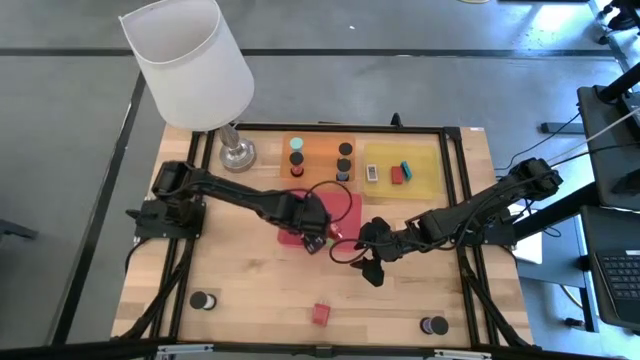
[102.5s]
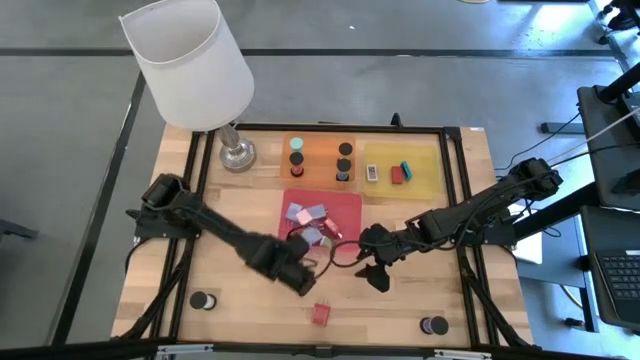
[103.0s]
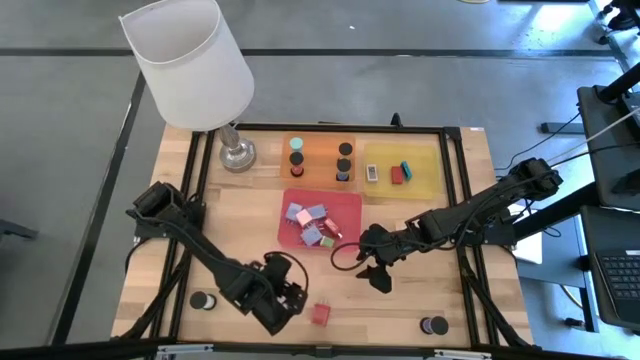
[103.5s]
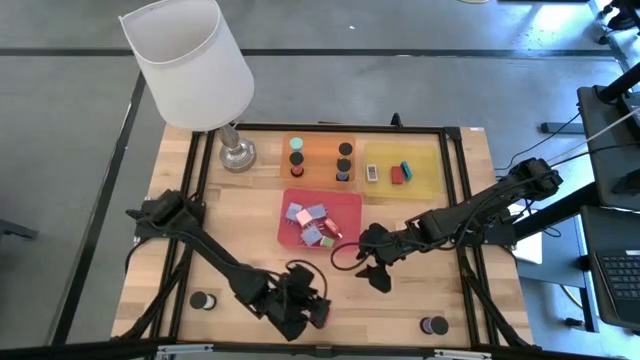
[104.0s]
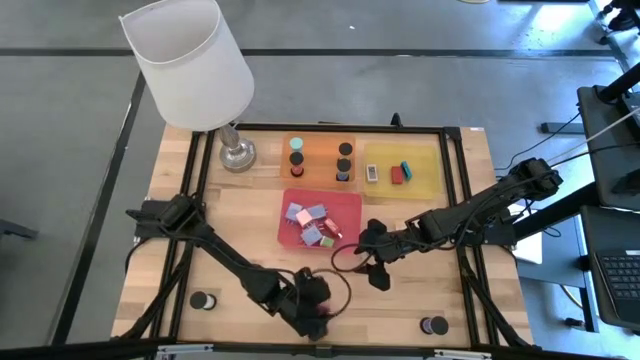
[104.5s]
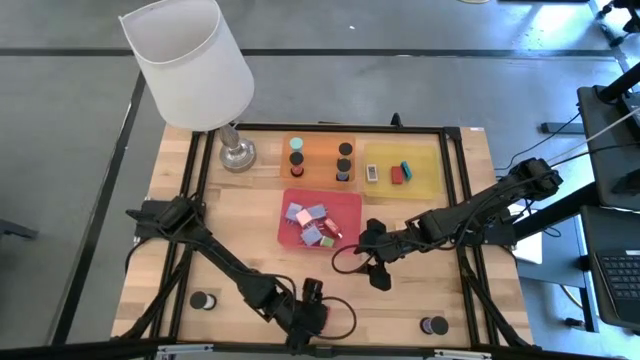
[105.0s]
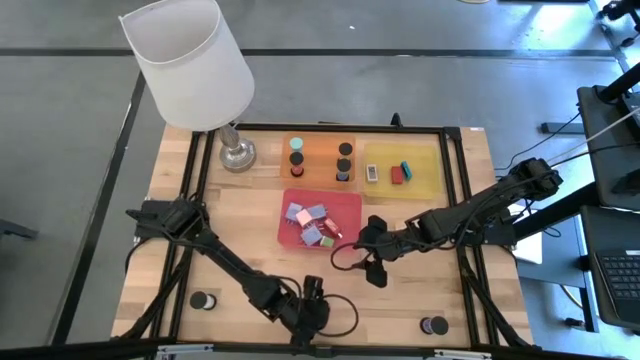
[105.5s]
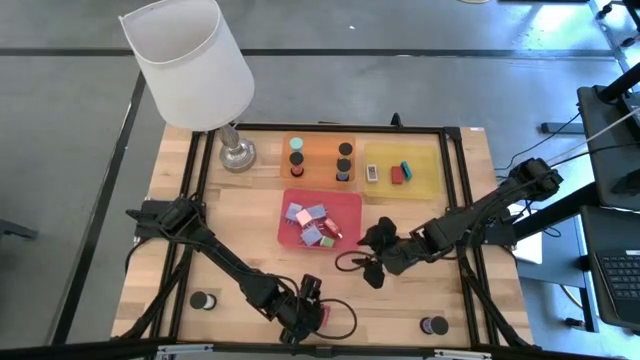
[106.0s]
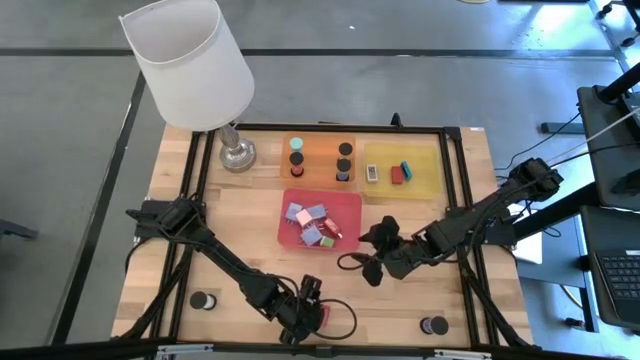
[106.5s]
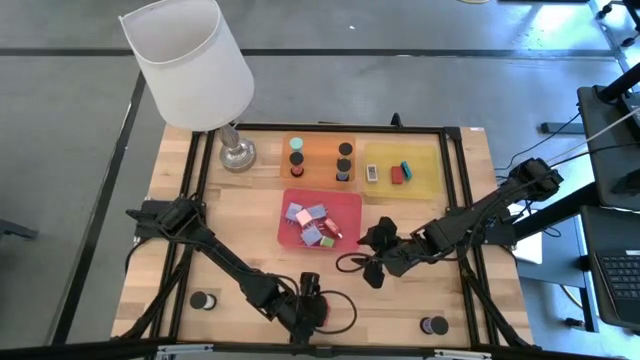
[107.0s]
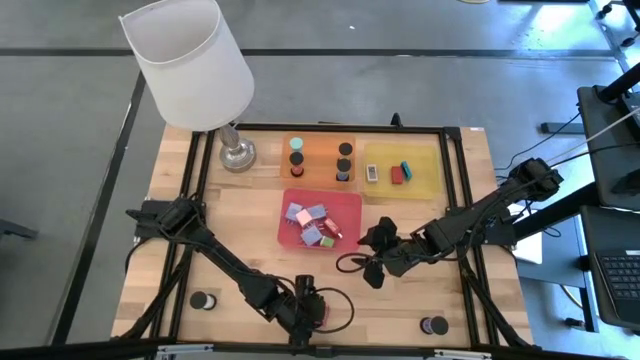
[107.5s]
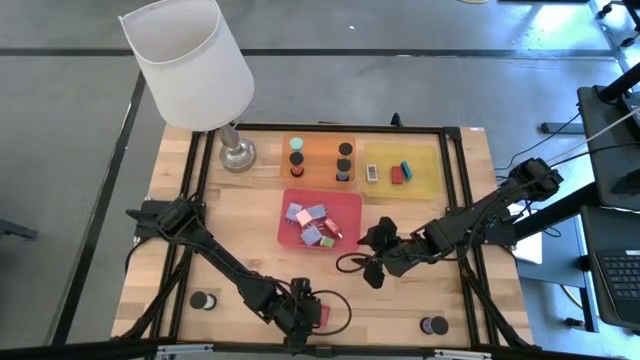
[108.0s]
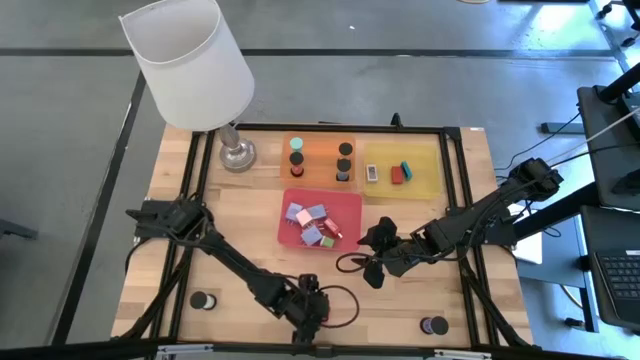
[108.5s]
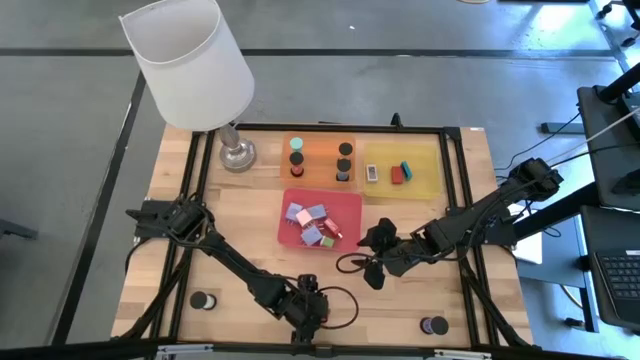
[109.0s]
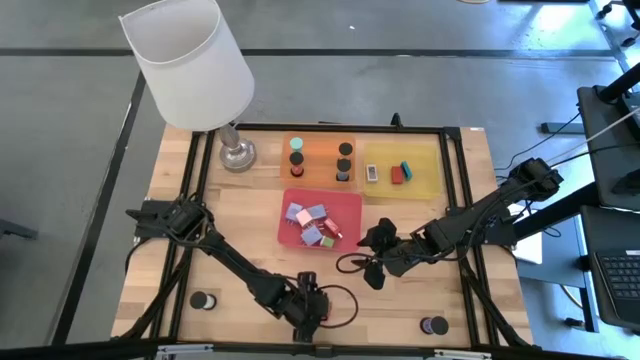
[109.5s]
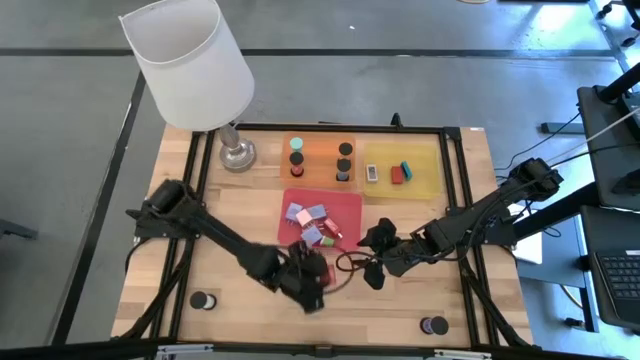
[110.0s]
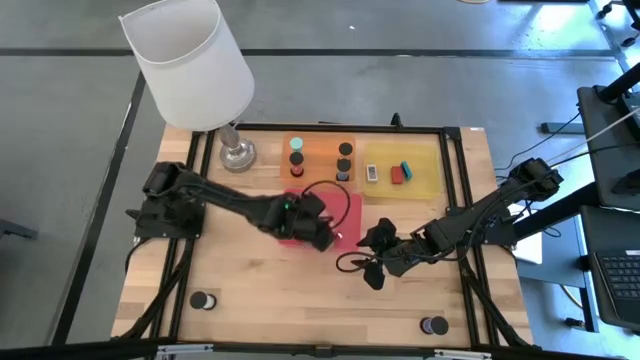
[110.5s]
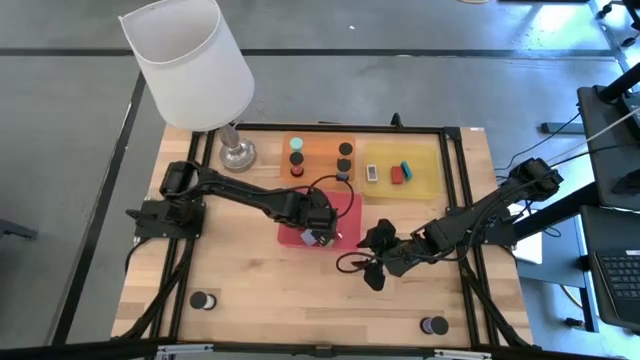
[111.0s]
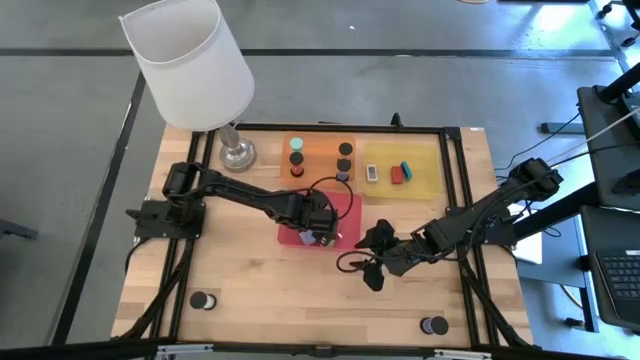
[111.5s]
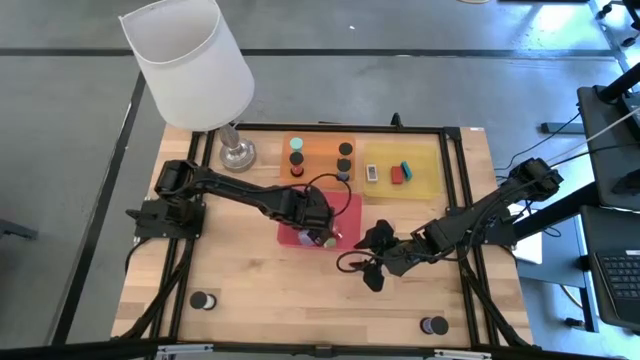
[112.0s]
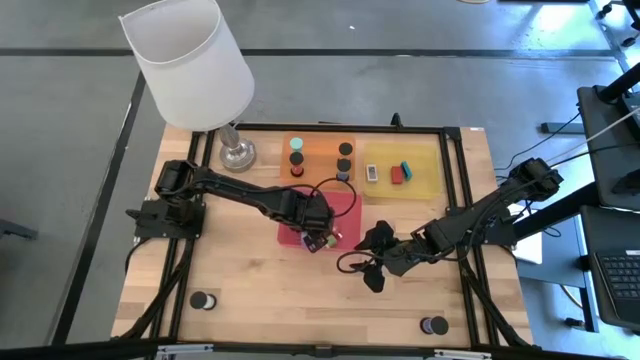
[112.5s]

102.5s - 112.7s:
Task: Pick & Place Office items
Put the red charger adapter into the red bin

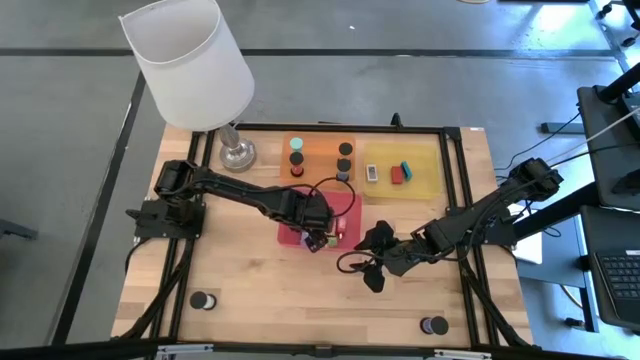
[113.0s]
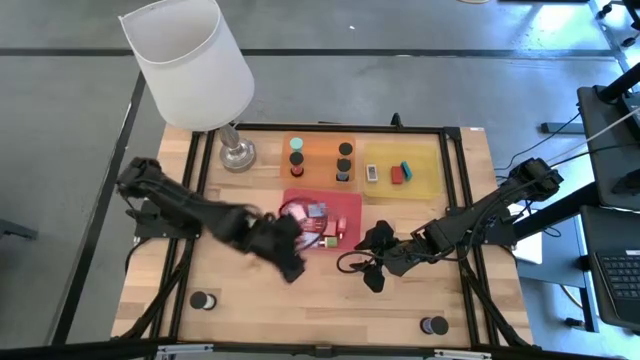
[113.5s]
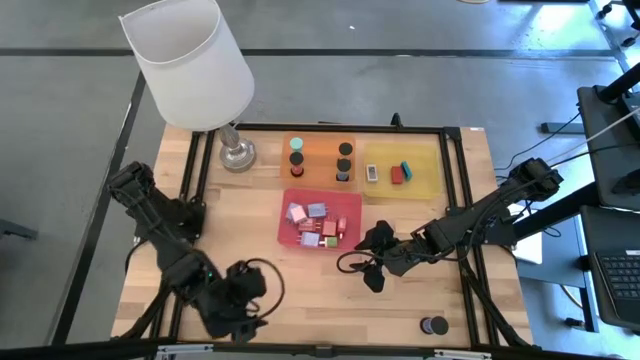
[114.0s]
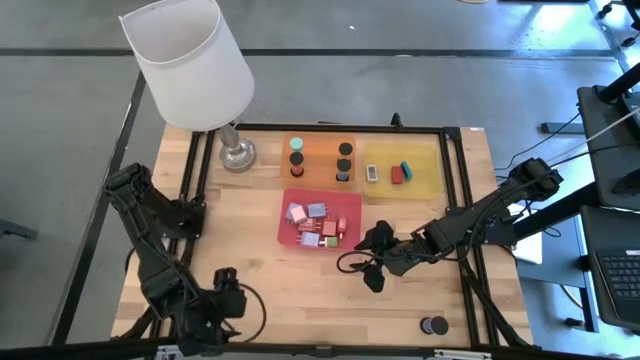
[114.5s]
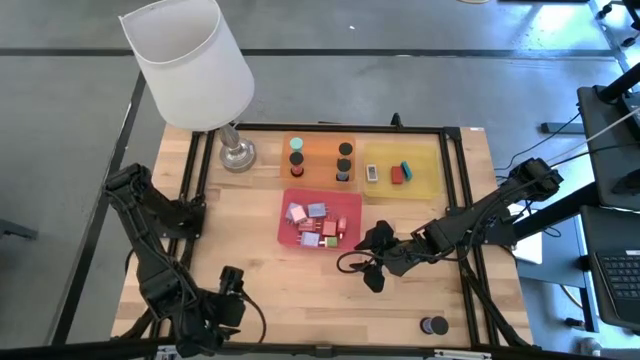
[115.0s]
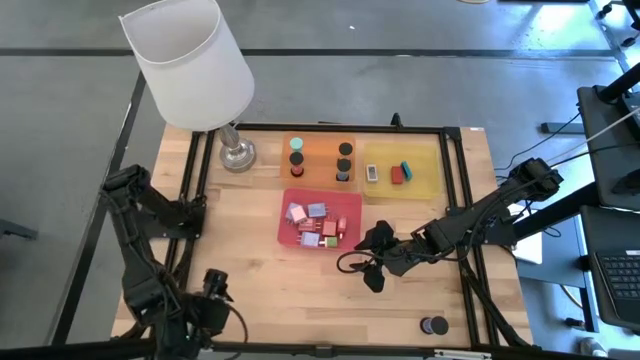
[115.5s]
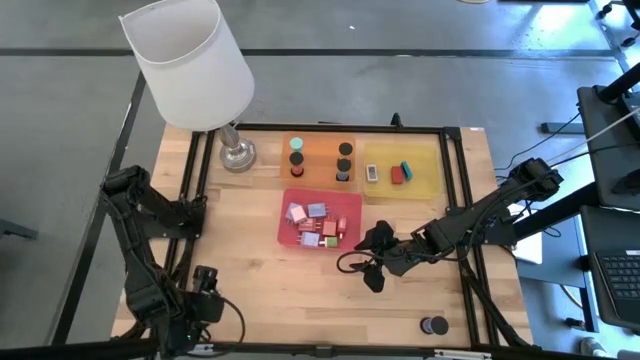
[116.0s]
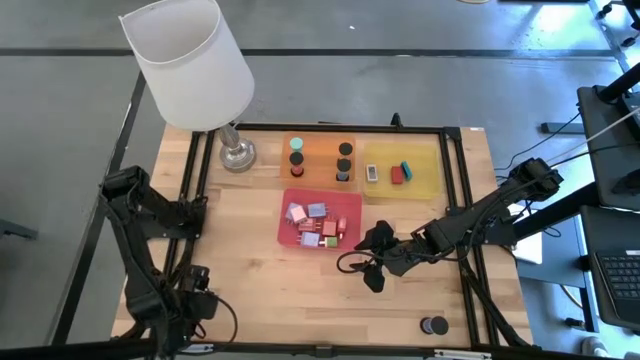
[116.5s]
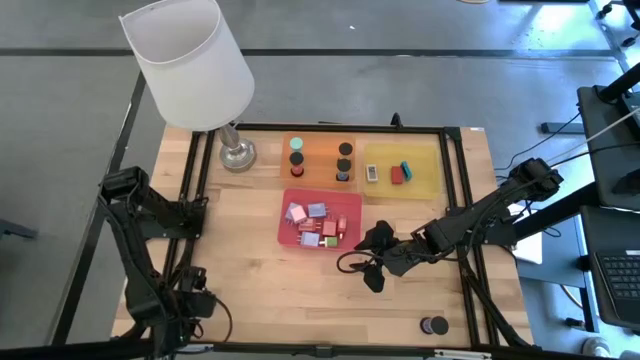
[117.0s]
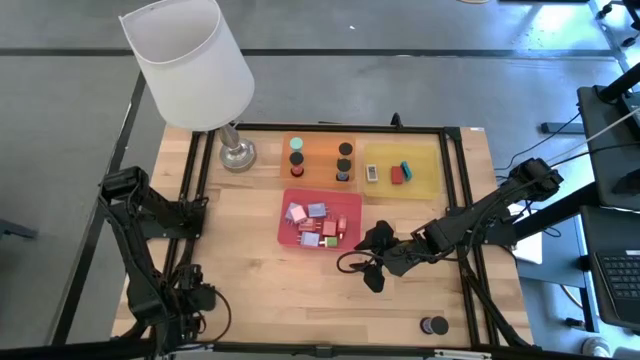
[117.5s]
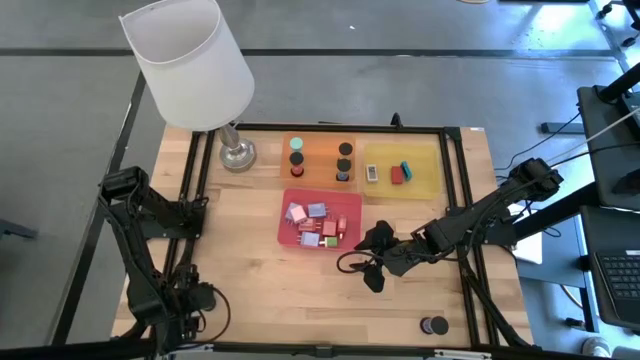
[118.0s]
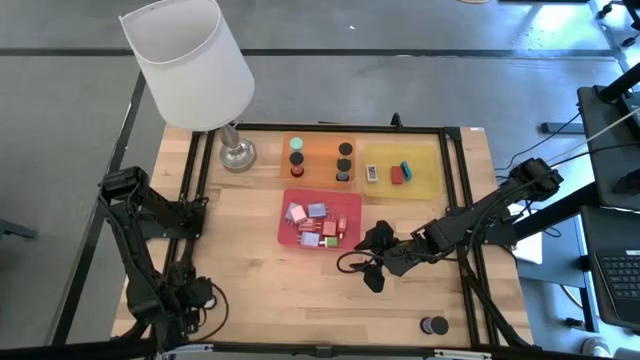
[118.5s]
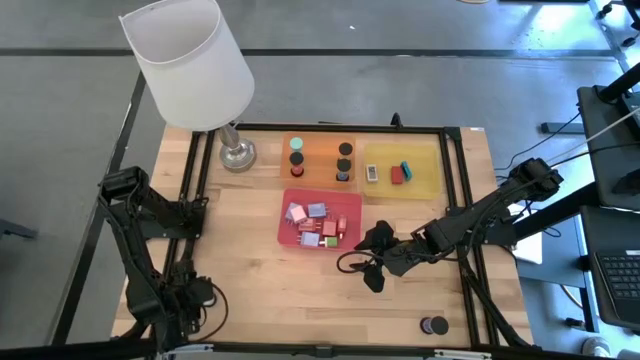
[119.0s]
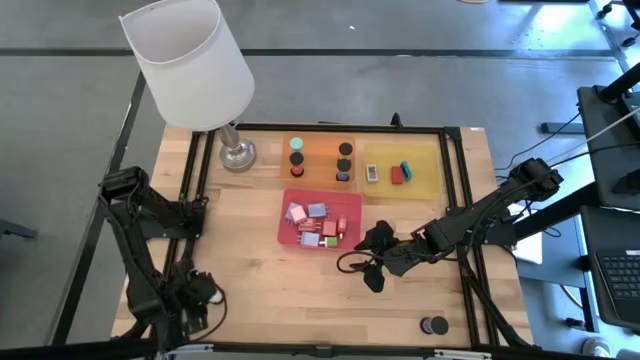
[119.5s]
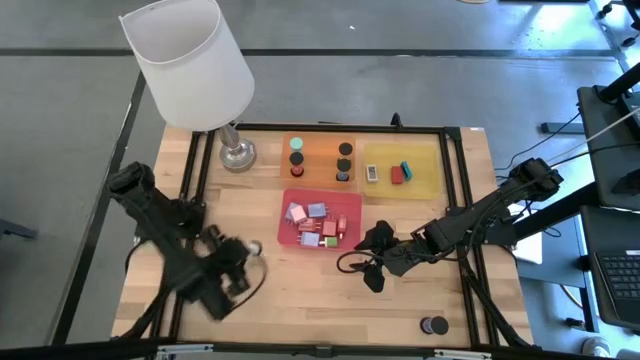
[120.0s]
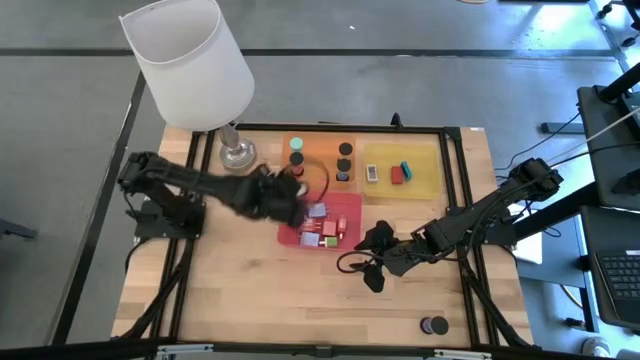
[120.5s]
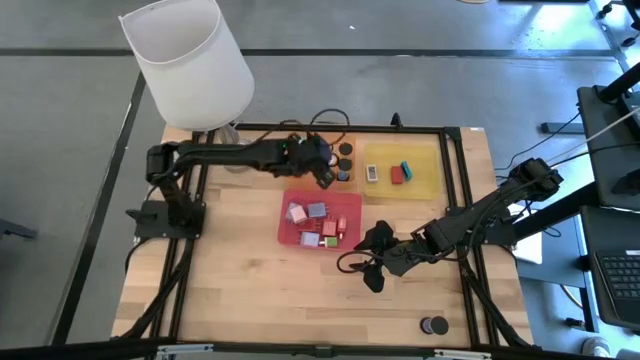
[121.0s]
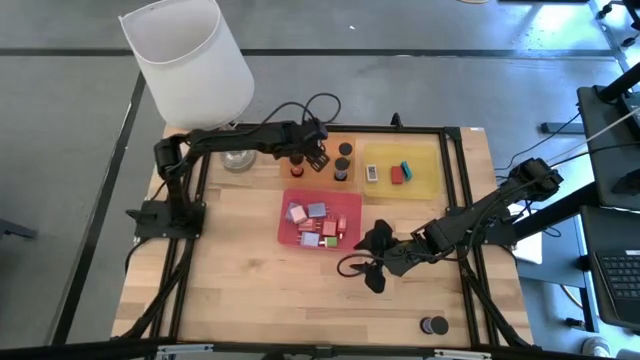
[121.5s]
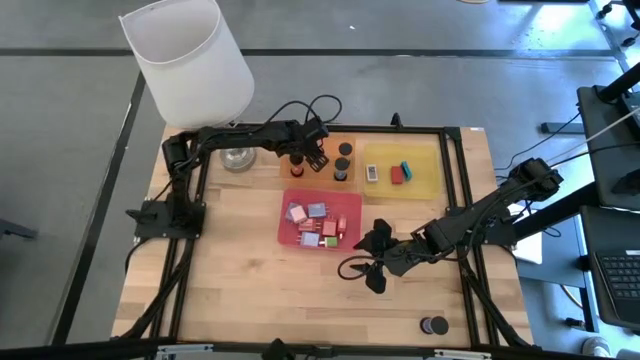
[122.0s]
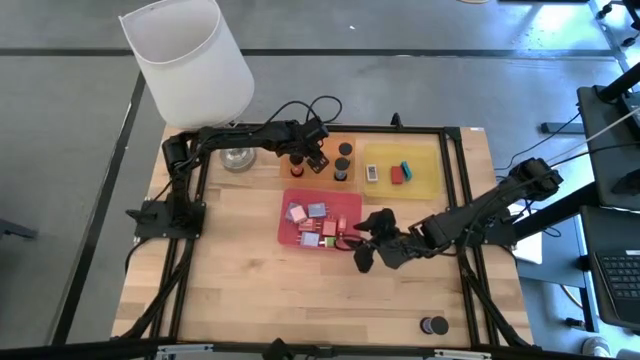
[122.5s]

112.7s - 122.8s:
Put the white black hourglass into the orange bin
